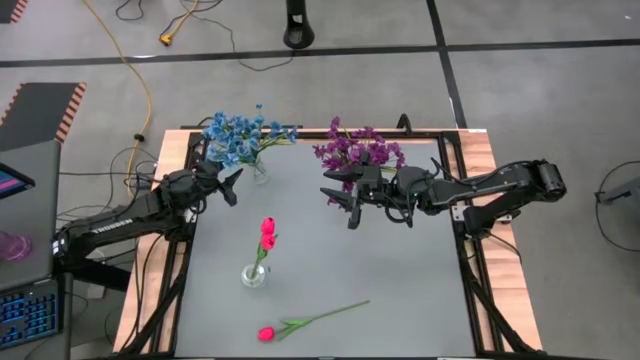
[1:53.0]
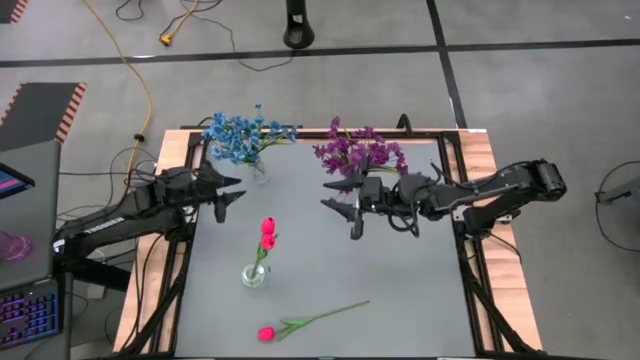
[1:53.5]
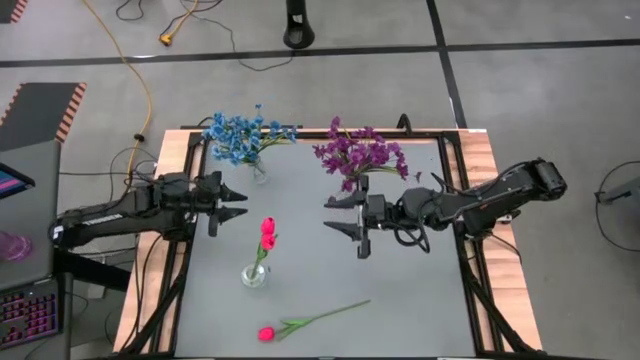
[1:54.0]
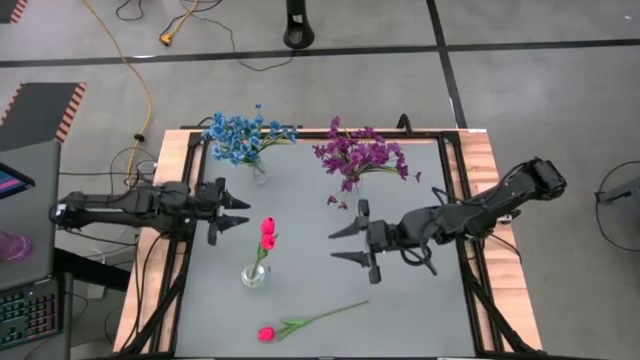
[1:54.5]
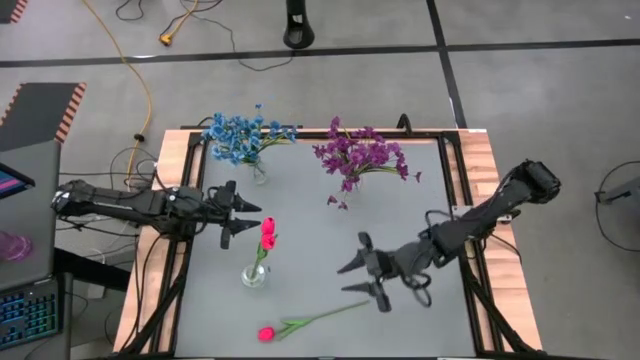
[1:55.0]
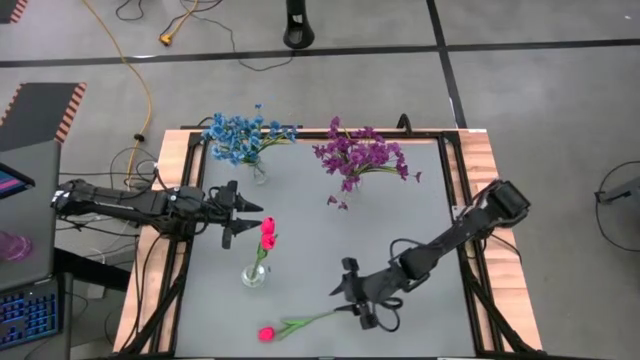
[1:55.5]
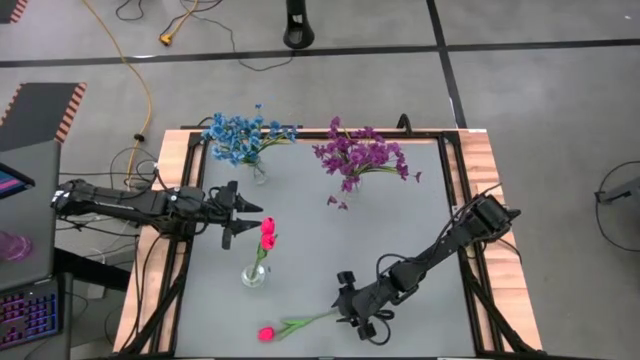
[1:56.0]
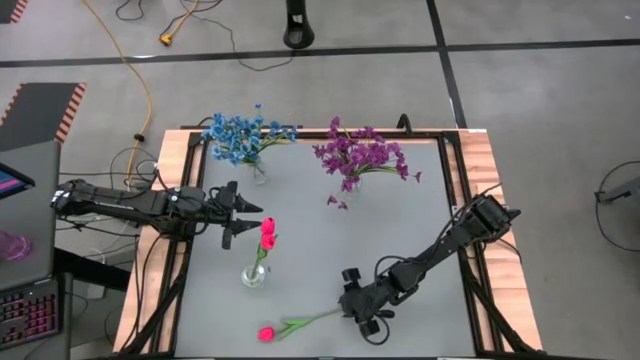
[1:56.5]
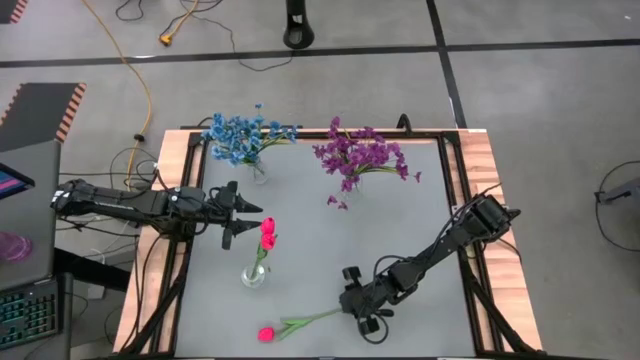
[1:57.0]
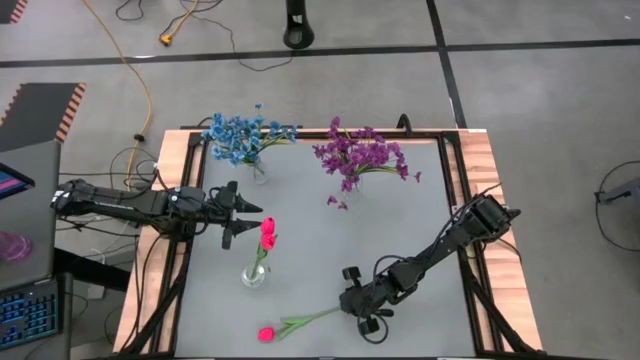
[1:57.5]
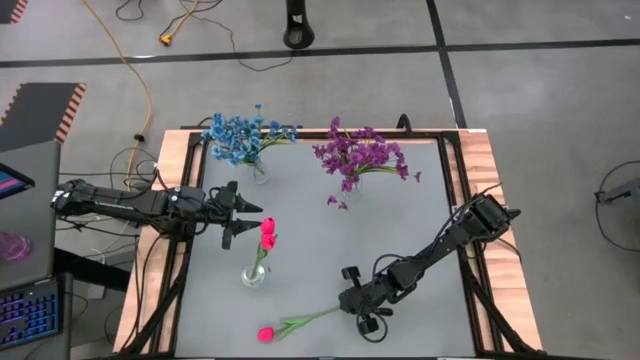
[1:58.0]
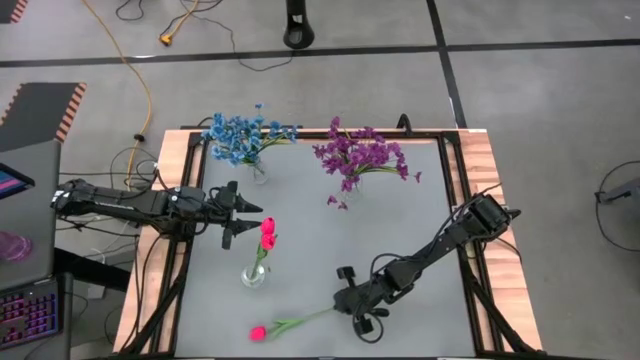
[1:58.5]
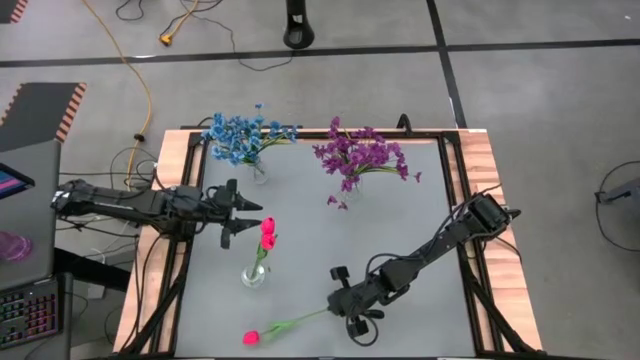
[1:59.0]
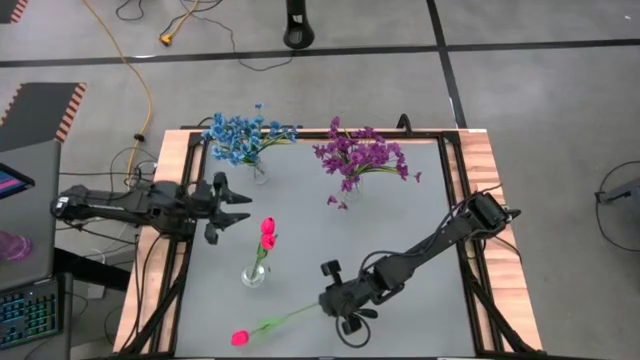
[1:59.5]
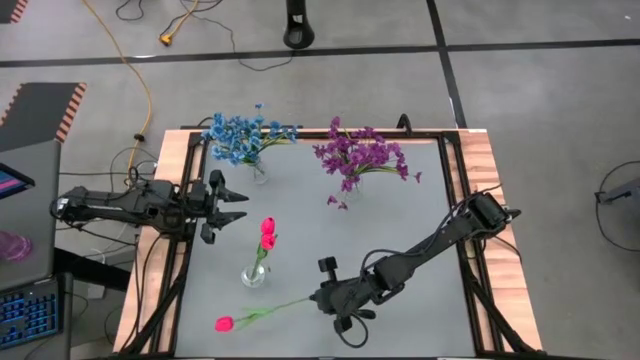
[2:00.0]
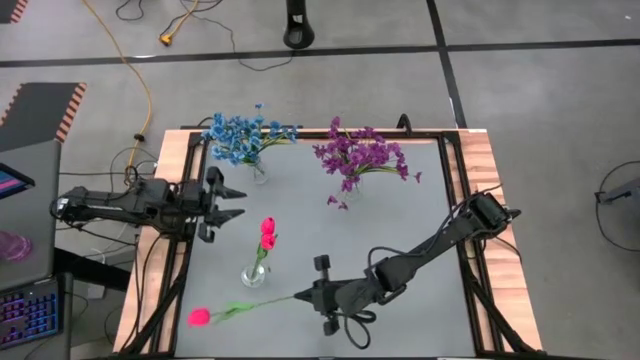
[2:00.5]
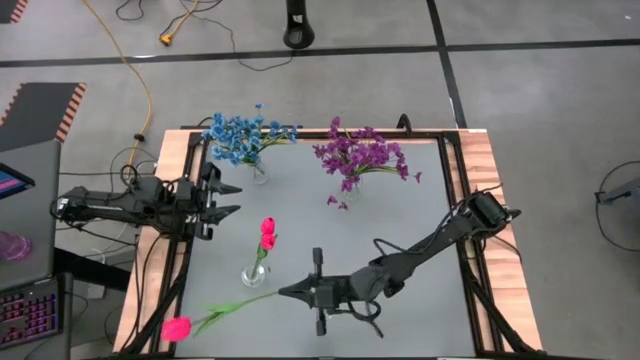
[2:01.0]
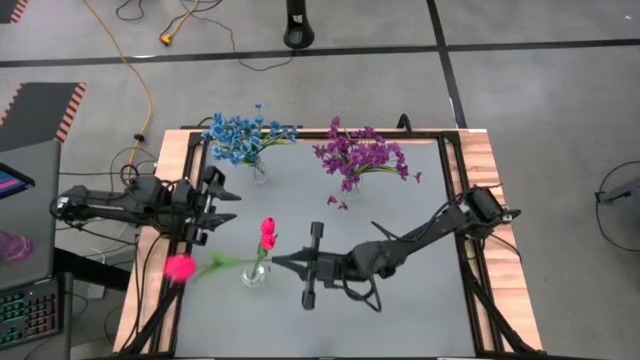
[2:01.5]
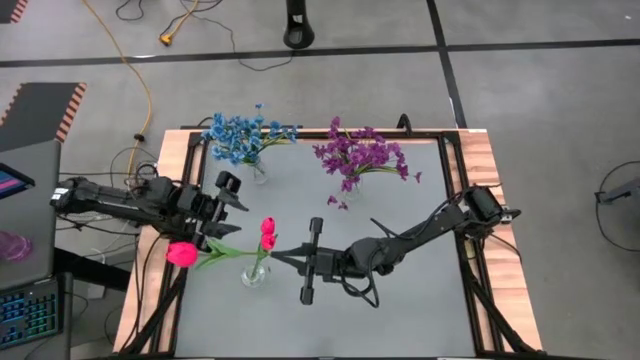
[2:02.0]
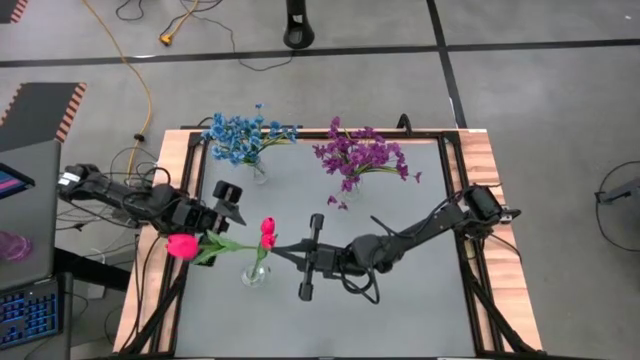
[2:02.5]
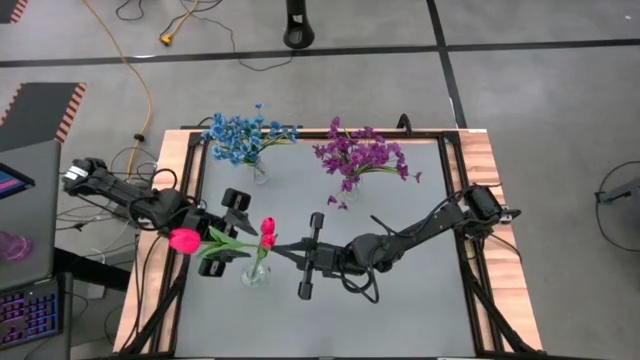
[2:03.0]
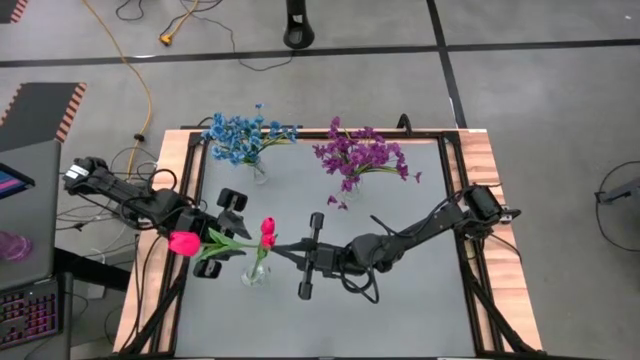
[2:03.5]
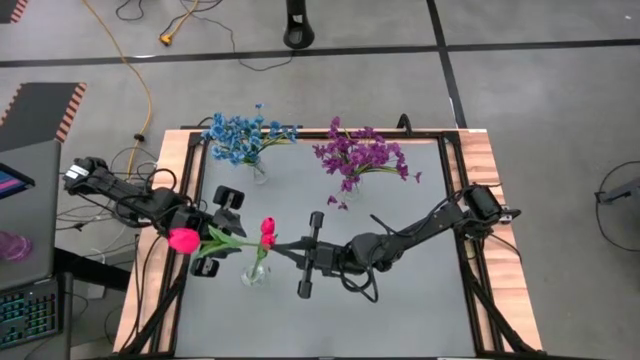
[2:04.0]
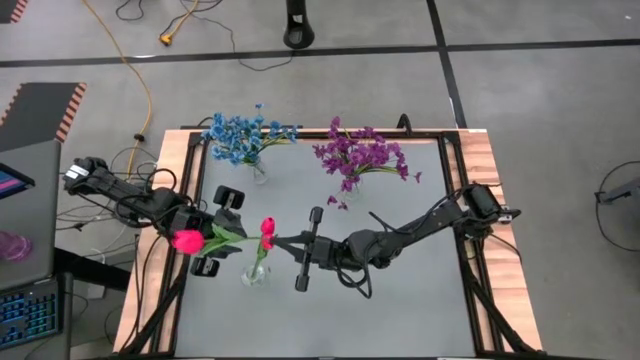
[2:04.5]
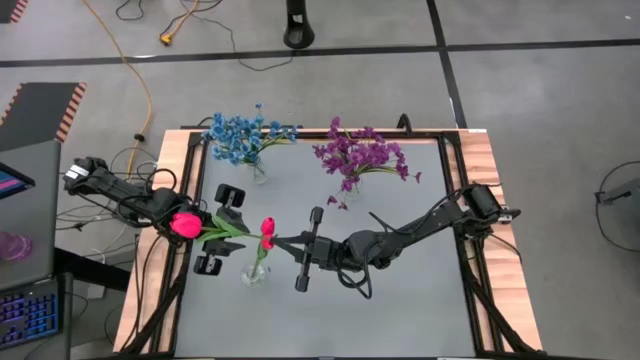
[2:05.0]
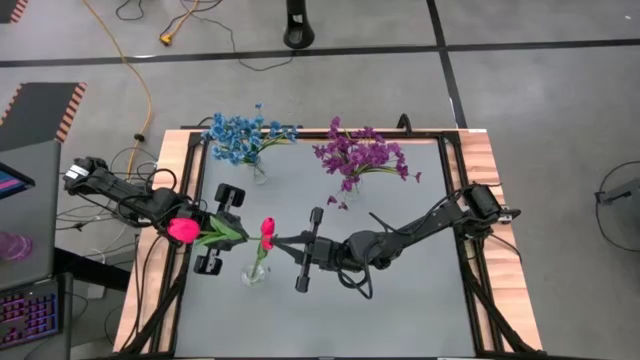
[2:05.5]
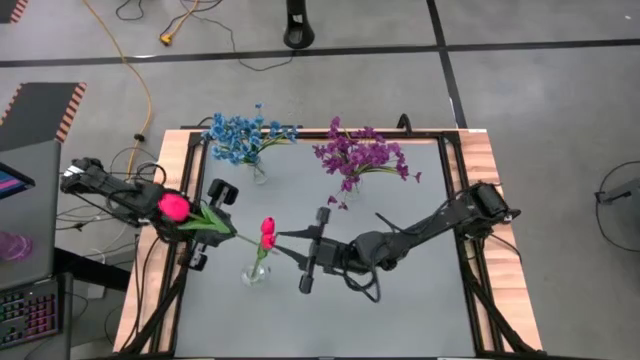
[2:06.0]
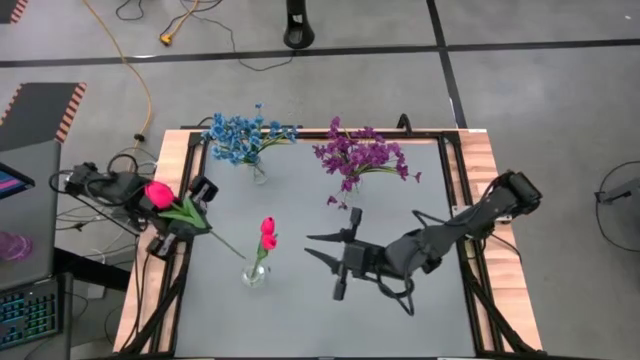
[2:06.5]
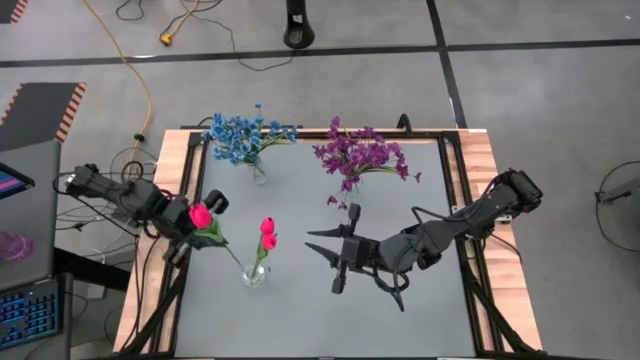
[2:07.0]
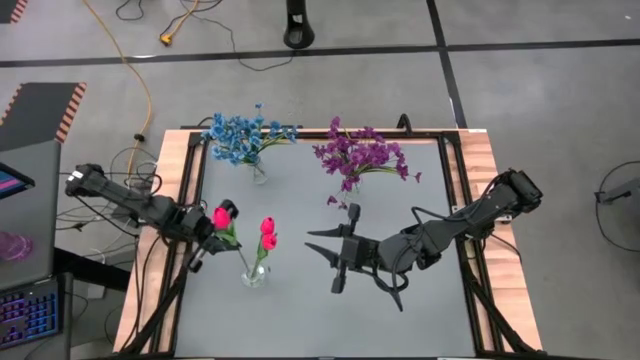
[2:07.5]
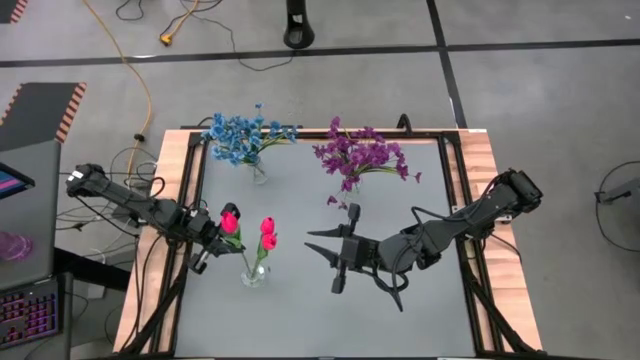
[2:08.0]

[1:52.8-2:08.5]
Task: Sort flowers into vase by color
Put the red flower into the bottom transparent vase

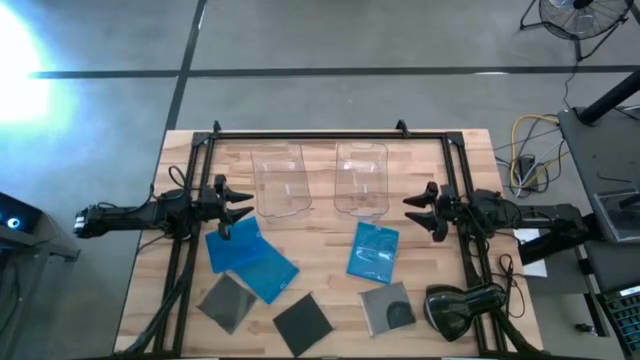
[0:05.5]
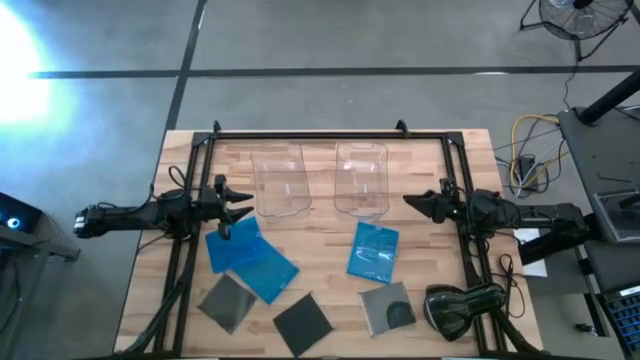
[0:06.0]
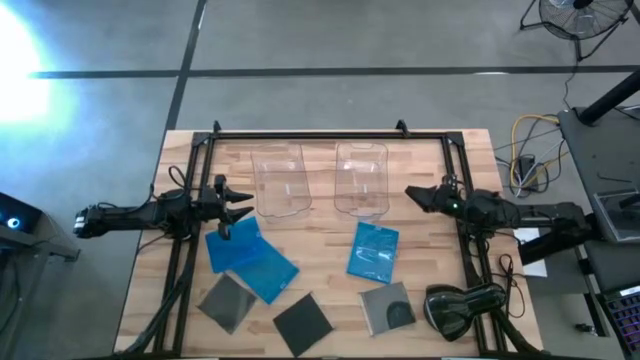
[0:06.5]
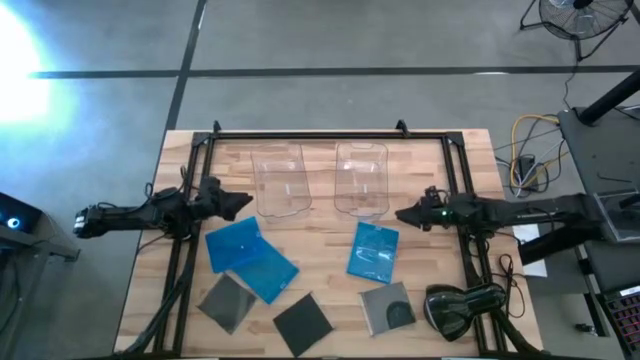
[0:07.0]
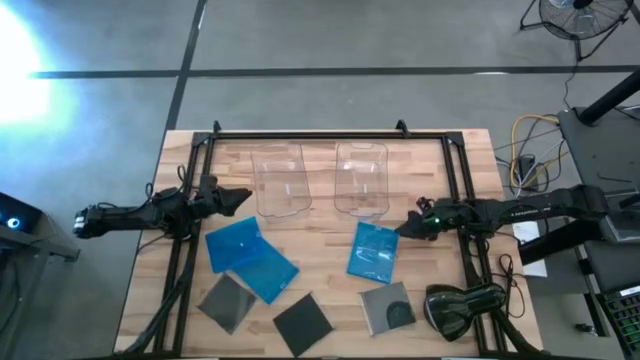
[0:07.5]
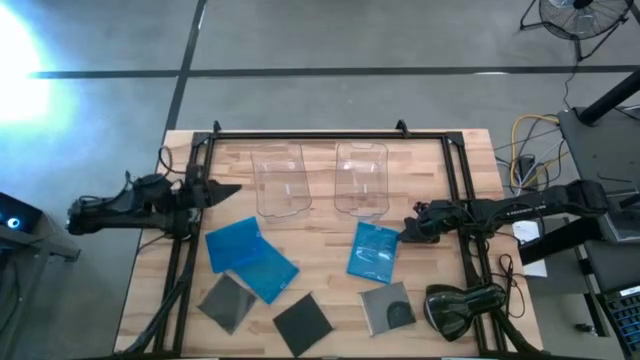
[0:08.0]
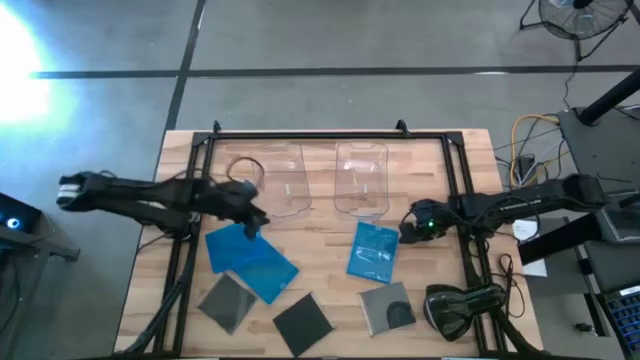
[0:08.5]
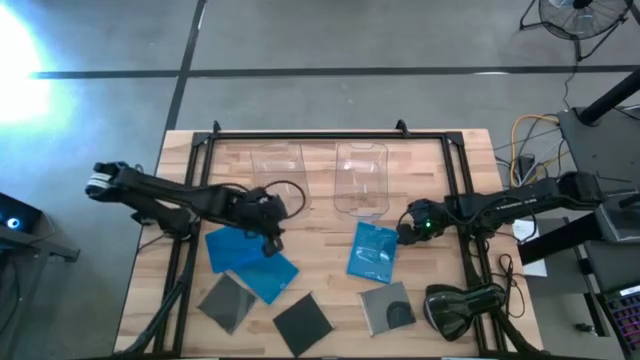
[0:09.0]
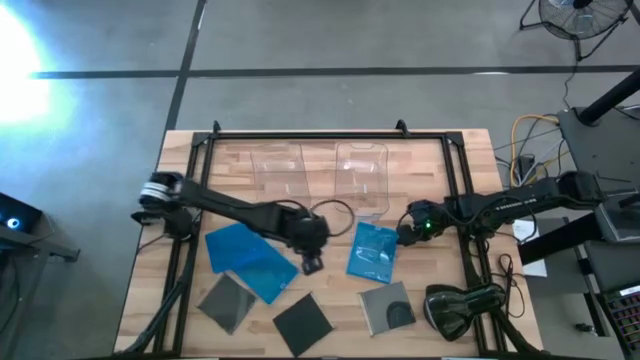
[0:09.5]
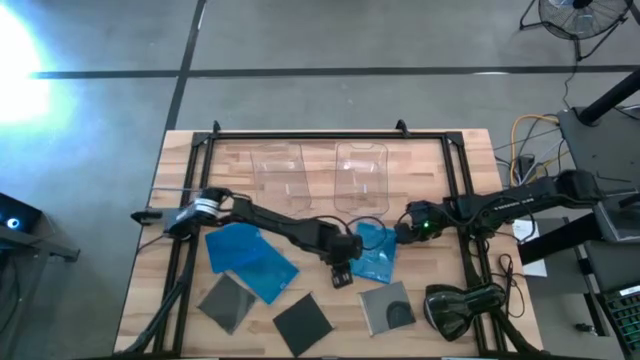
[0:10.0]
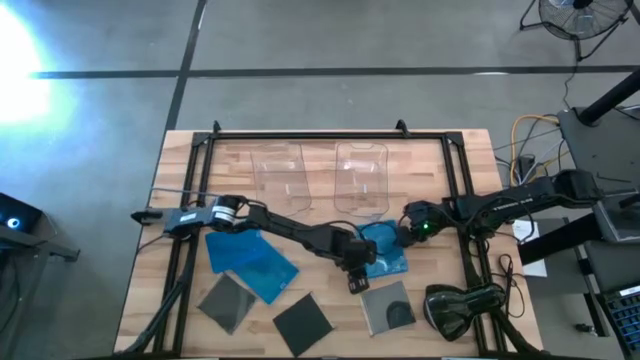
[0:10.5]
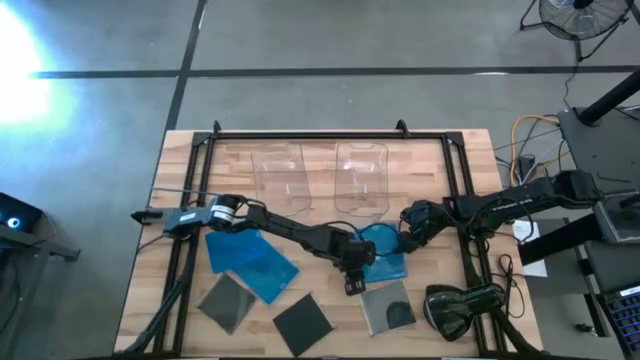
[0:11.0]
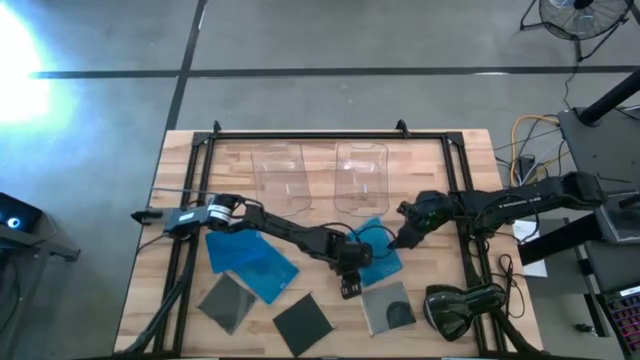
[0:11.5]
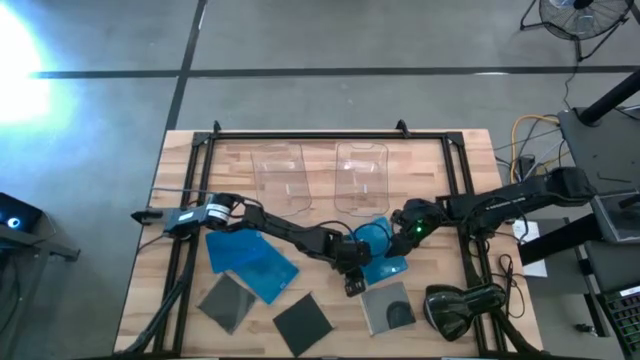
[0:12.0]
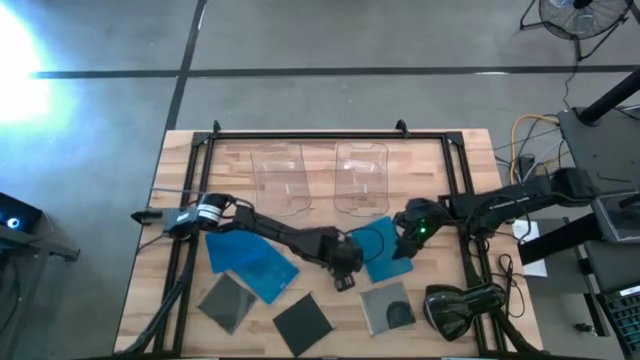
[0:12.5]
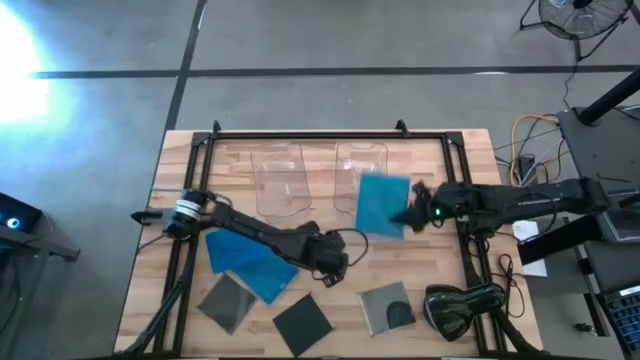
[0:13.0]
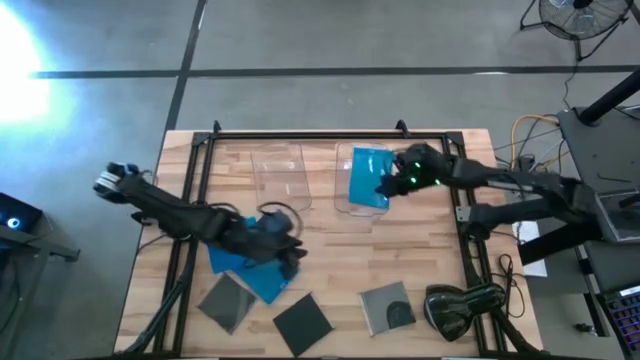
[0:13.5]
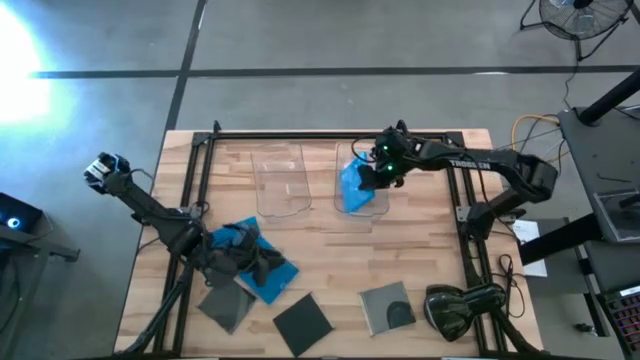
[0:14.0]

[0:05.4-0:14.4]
Task: Pick & place jewel cases by type
Put the right blue CD case into the right transparent bin
